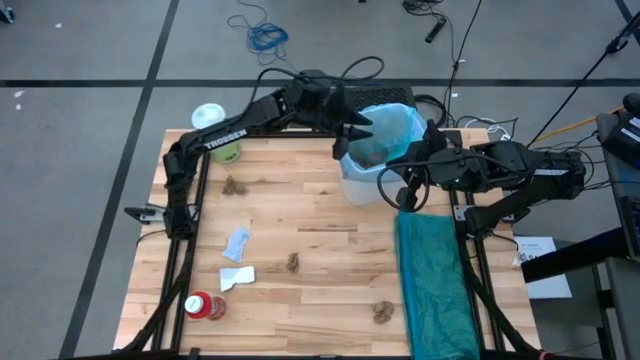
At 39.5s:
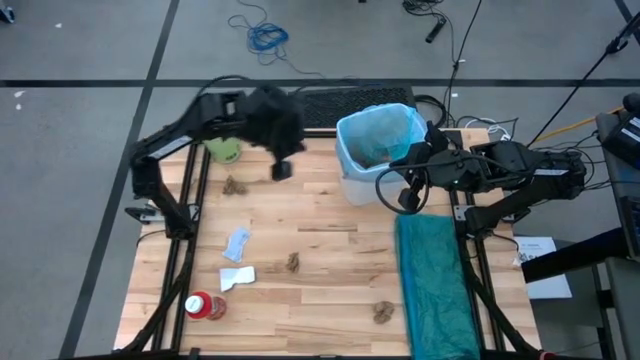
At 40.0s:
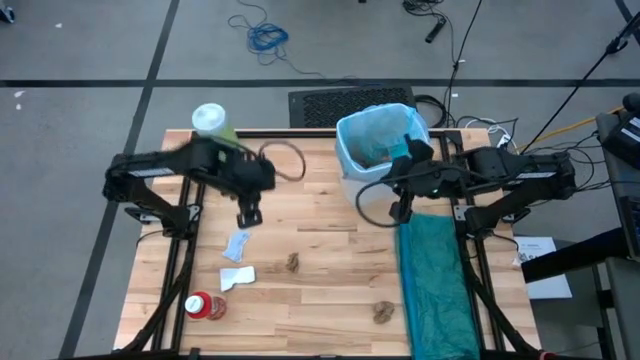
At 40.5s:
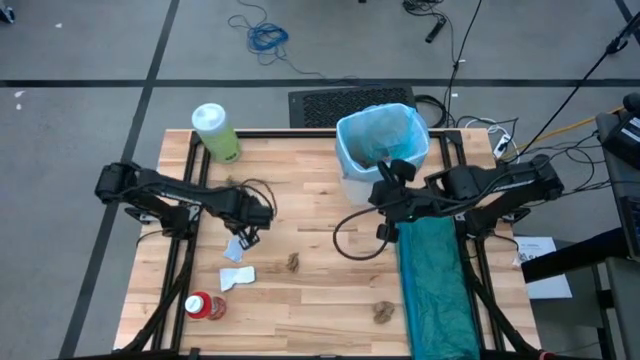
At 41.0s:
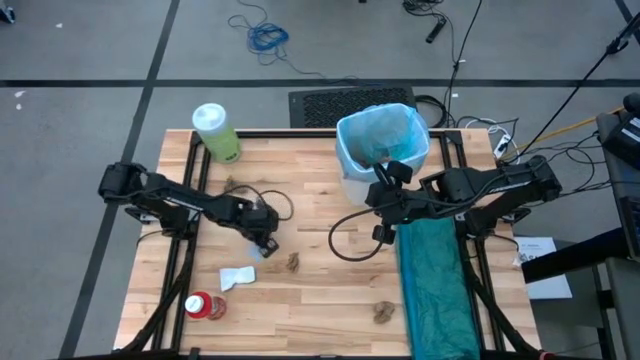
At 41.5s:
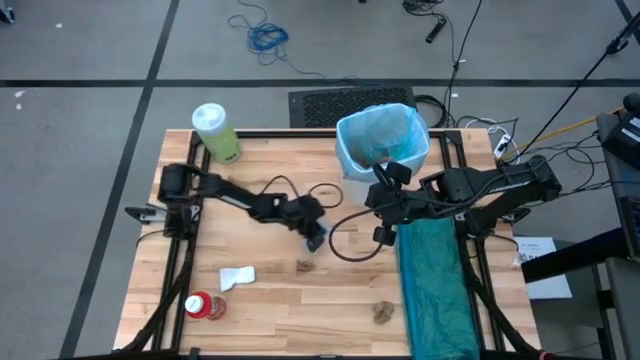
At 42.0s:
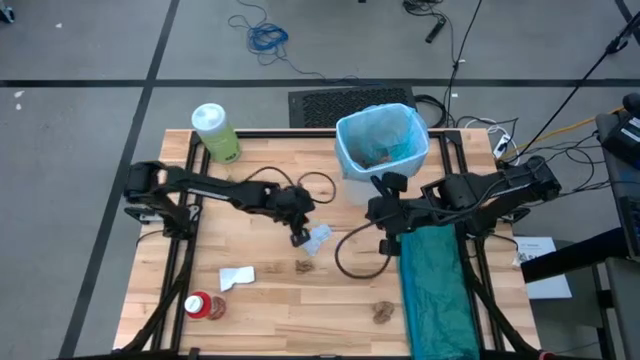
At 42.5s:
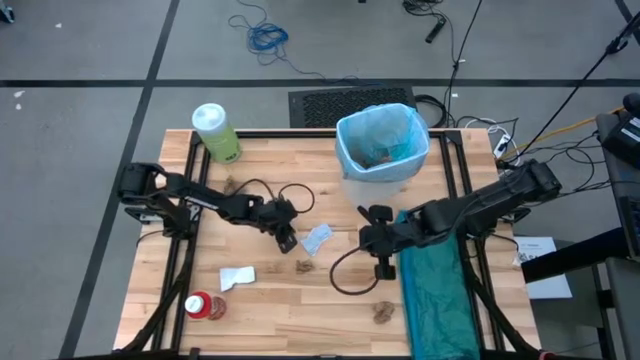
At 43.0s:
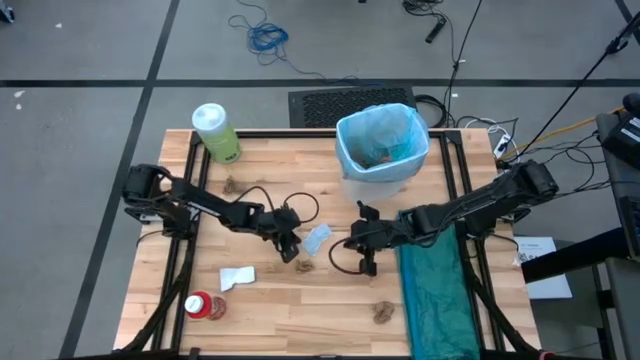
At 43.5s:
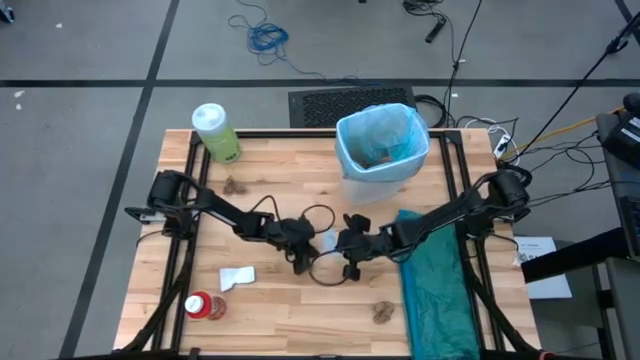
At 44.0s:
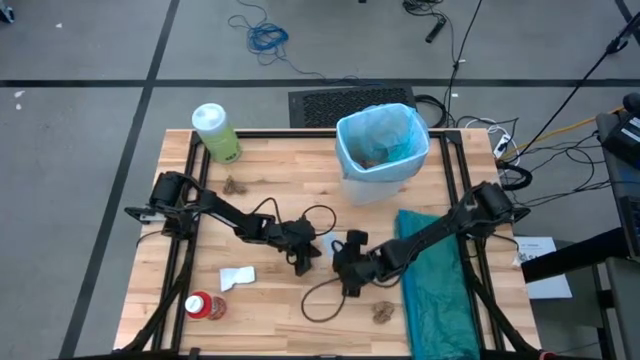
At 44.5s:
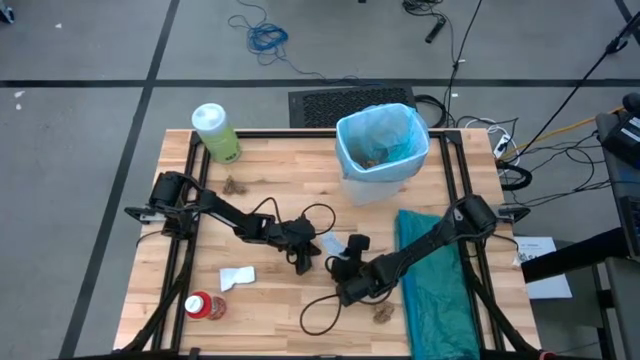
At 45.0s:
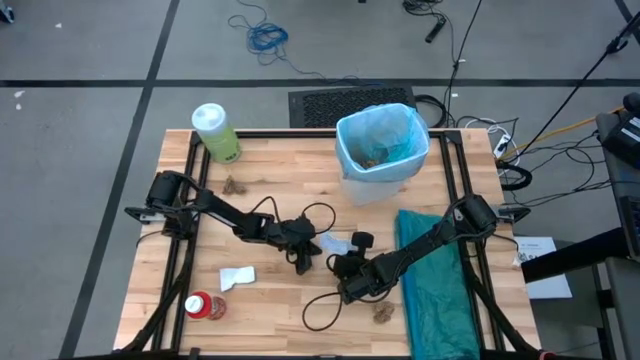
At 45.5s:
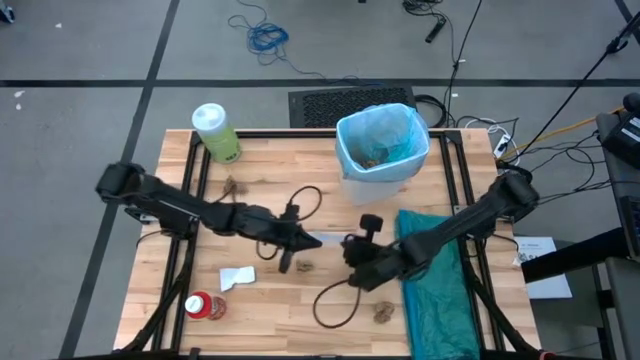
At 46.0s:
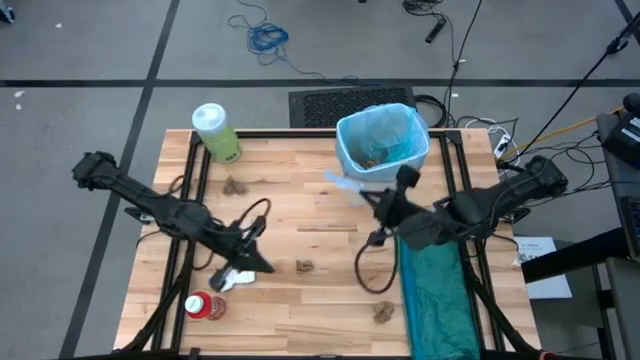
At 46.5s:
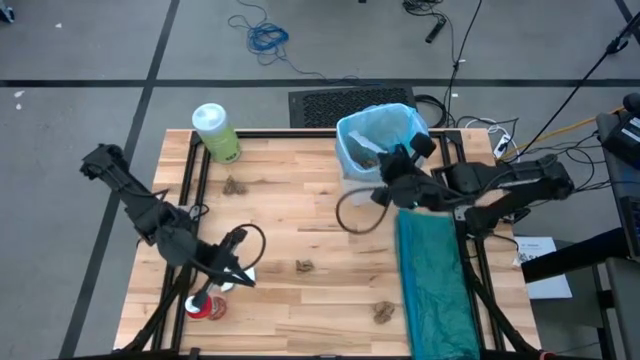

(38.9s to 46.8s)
Task: place trash/remove bag and relplace
Put the top white paper trash into the trash bin

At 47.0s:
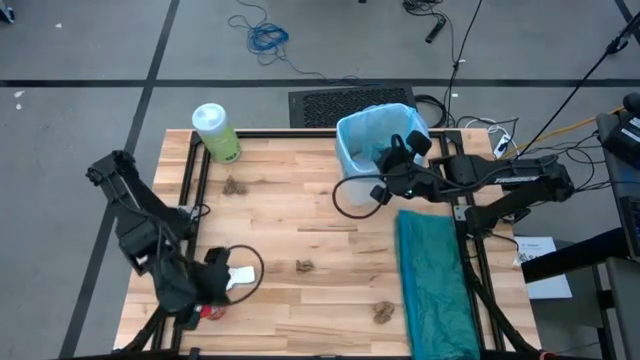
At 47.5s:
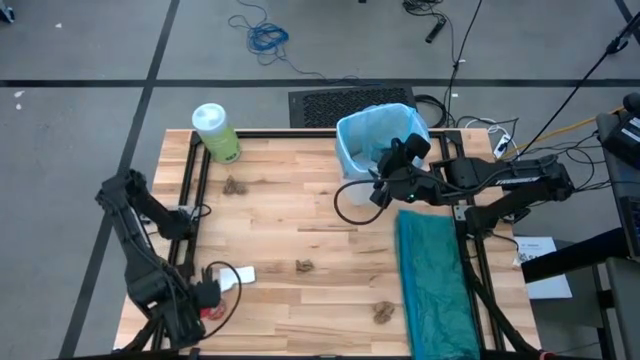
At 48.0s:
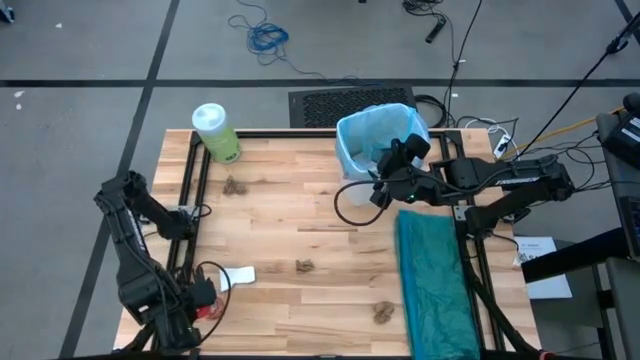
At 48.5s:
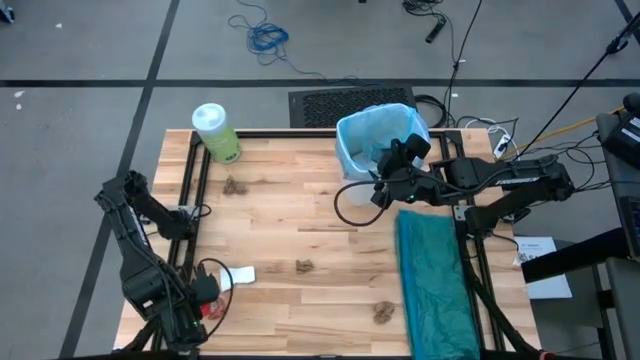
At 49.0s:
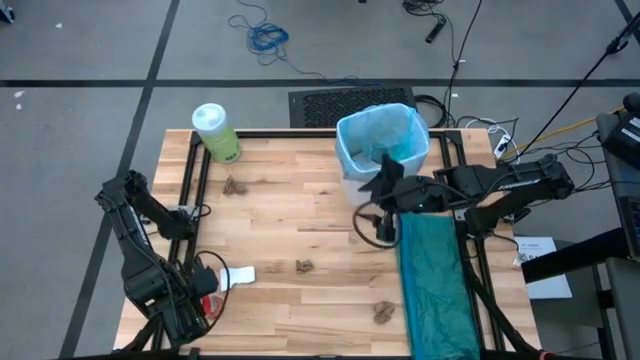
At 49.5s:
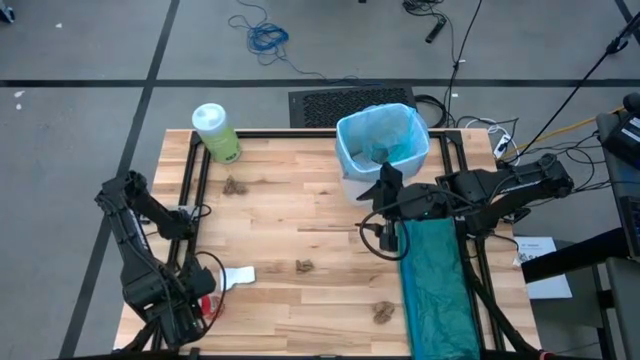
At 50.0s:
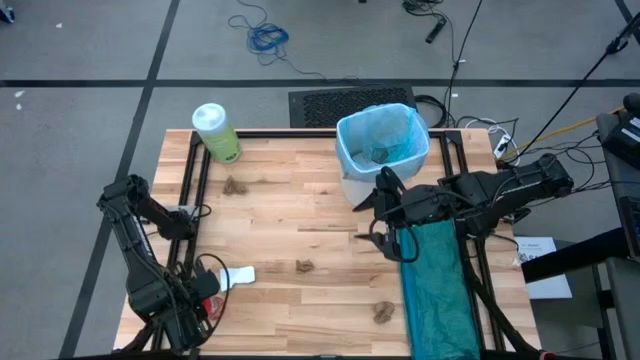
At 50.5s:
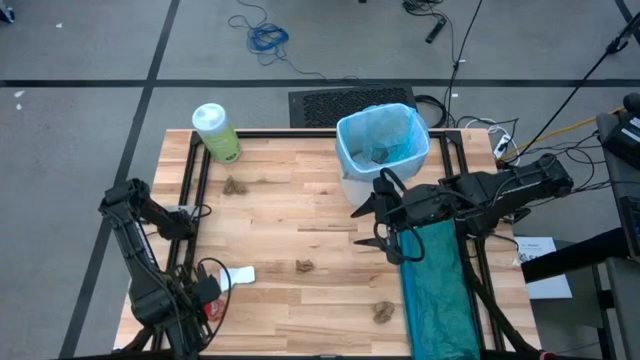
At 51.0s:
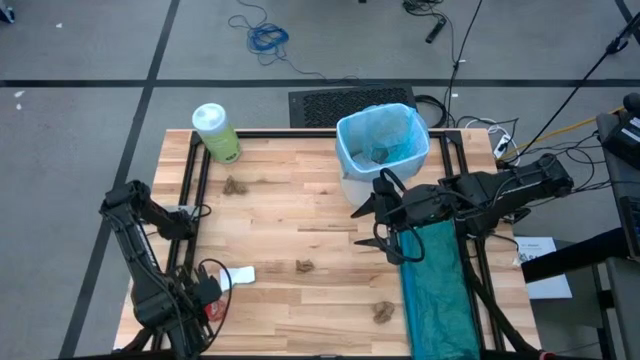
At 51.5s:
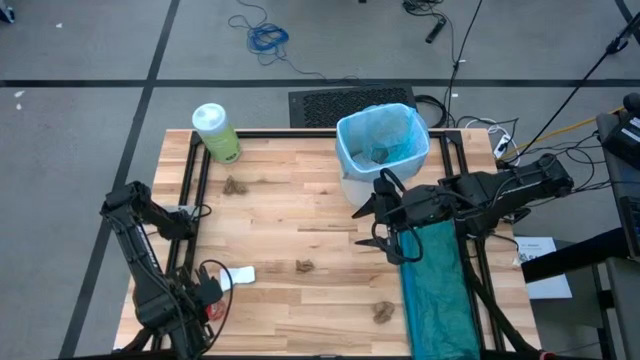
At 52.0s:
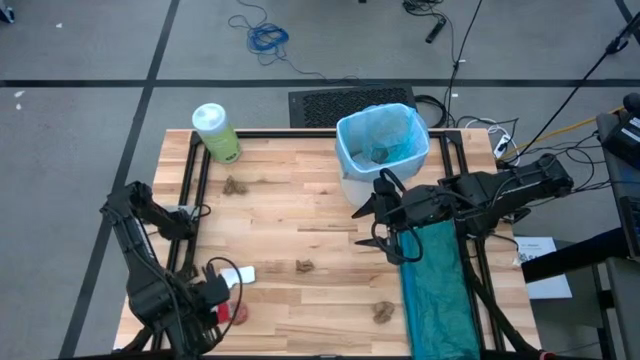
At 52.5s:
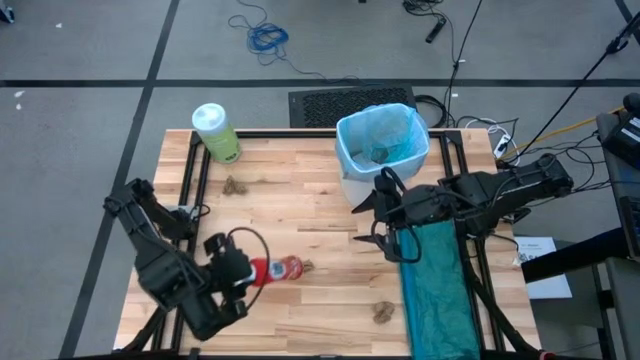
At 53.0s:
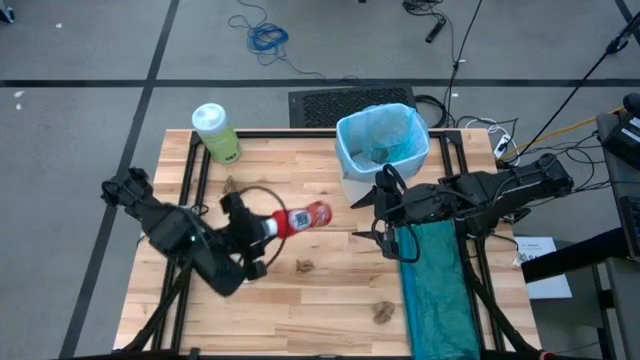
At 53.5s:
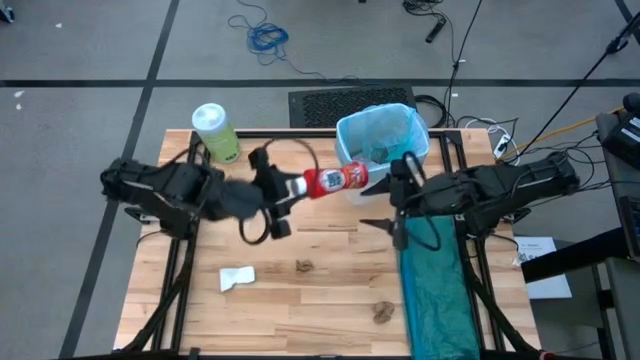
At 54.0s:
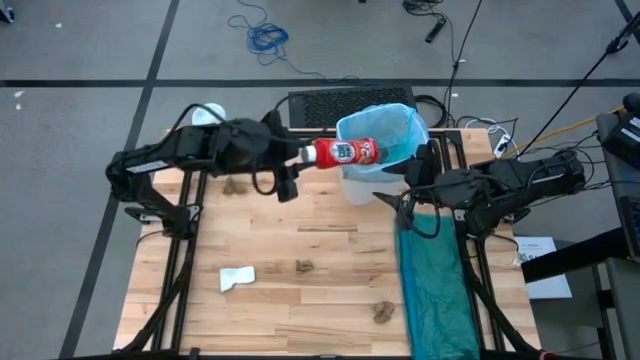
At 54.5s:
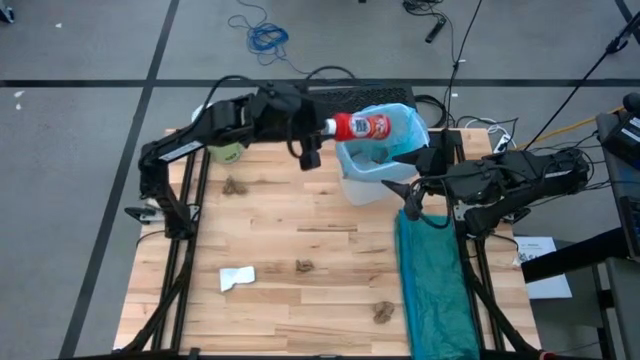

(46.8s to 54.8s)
Put the red bottle into the trash bin

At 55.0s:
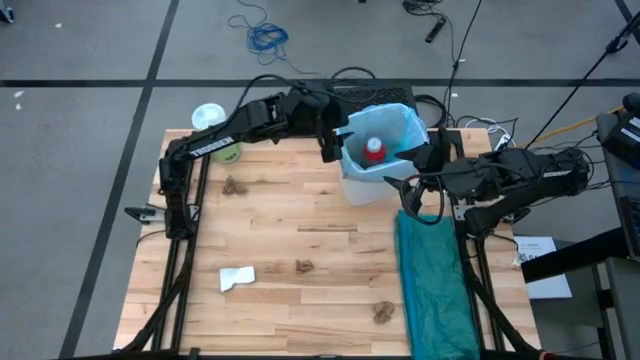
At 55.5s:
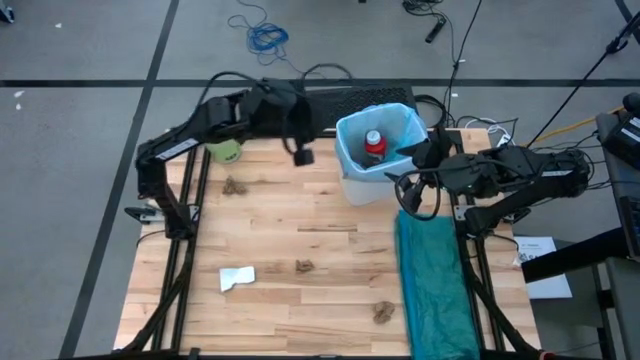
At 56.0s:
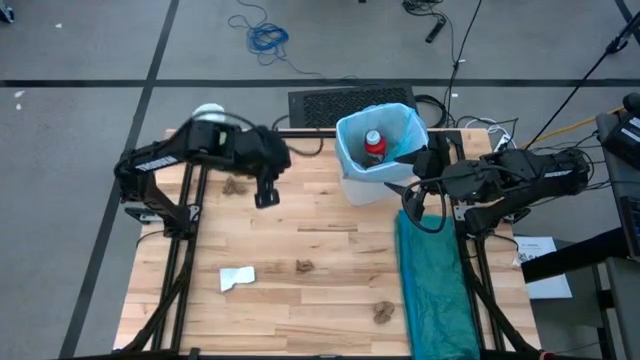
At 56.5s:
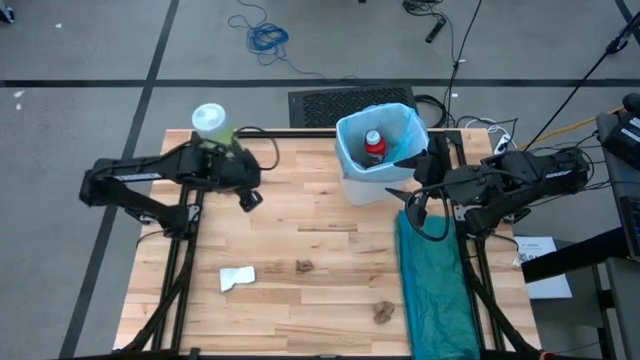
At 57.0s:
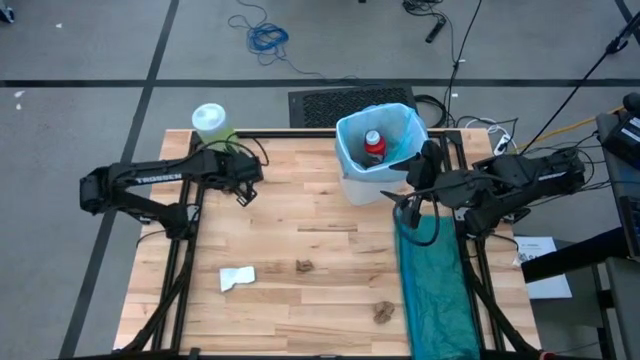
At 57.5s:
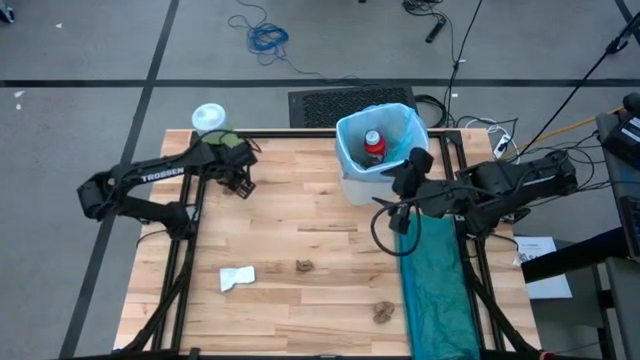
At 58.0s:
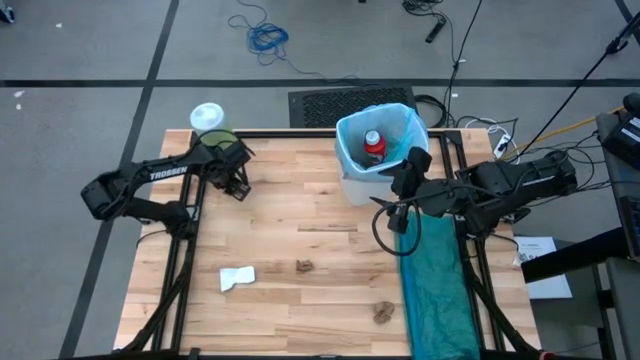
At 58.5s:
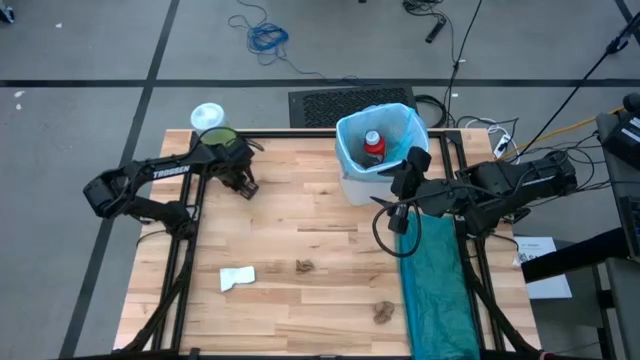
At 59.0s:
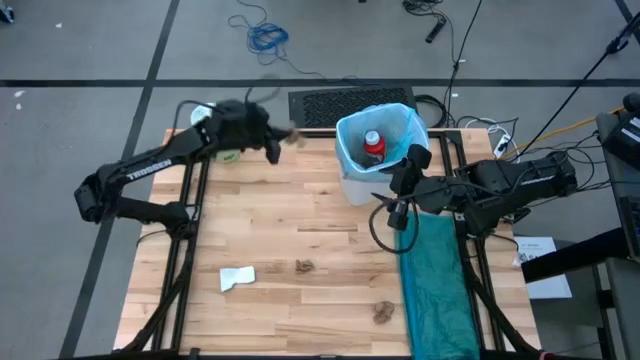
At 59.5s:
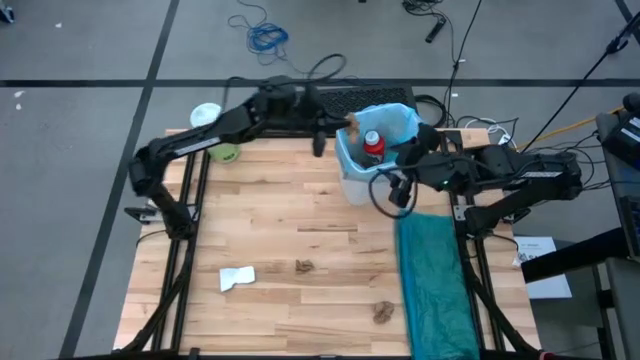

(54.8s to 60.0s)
Put the top brown paper trash into the trash bin
